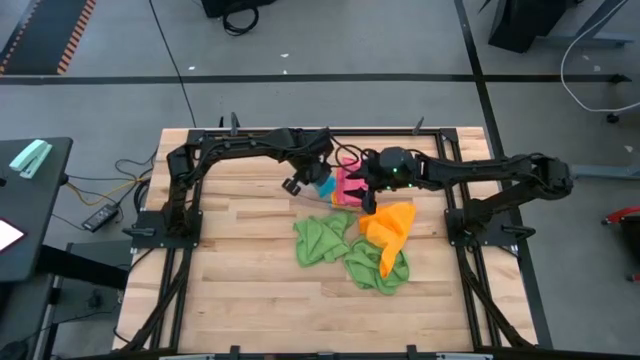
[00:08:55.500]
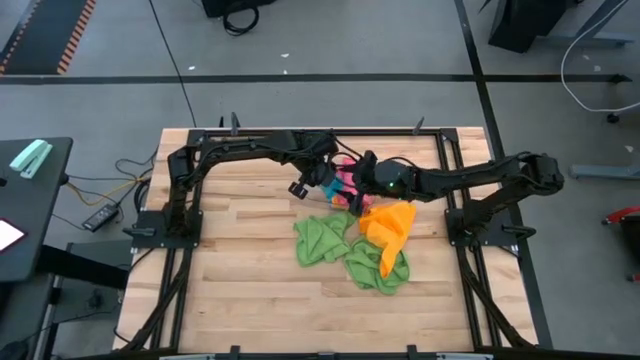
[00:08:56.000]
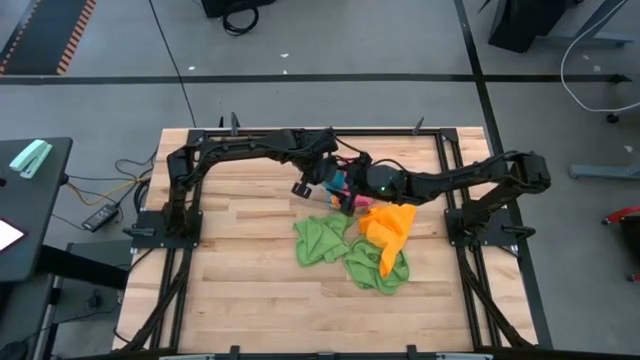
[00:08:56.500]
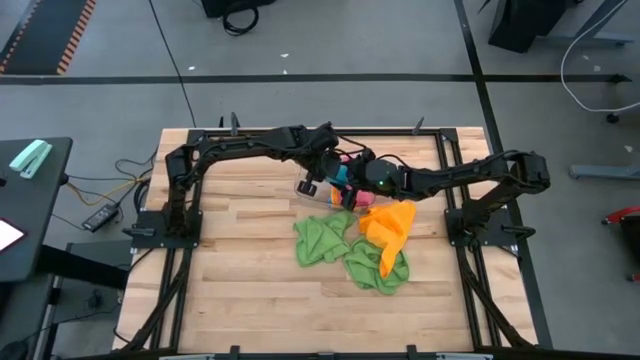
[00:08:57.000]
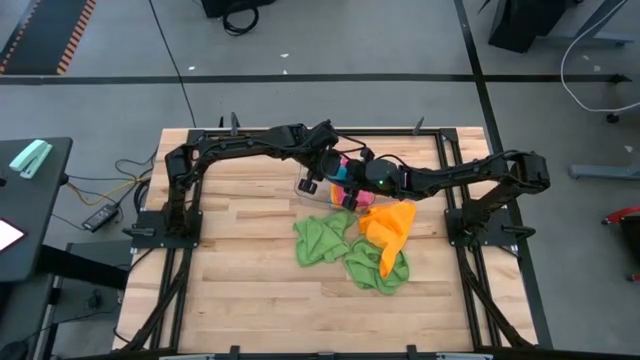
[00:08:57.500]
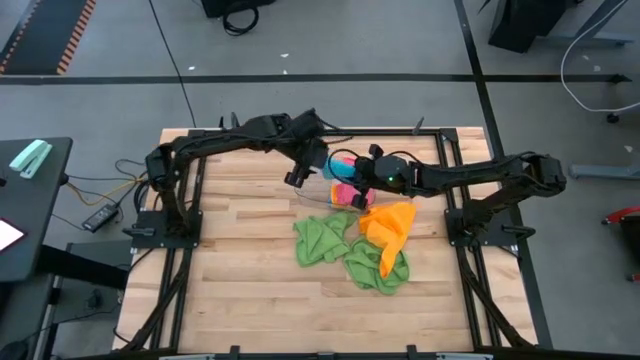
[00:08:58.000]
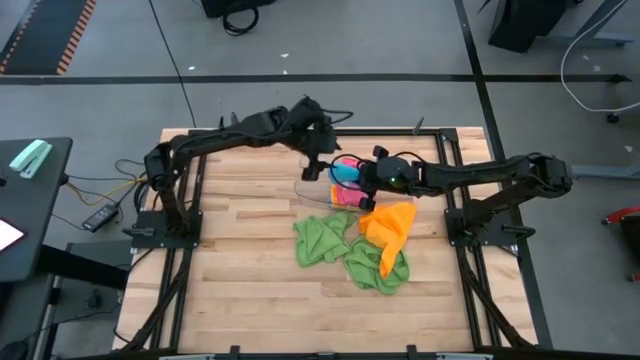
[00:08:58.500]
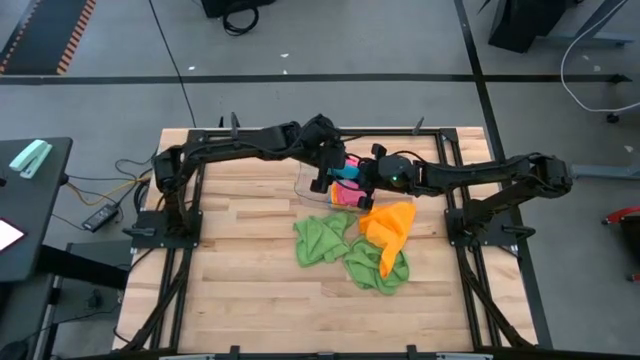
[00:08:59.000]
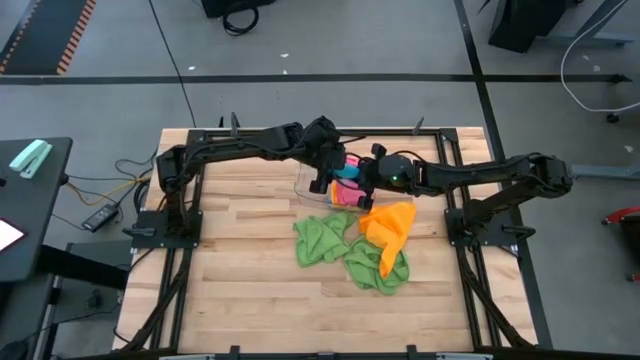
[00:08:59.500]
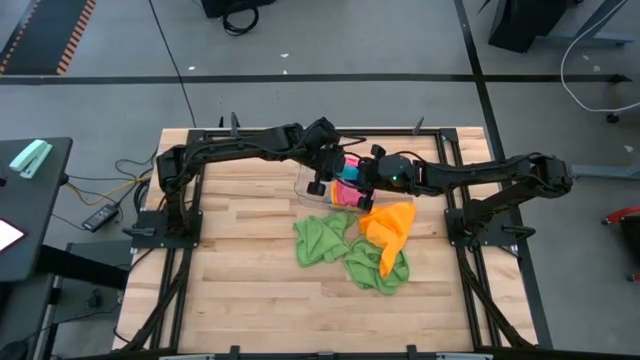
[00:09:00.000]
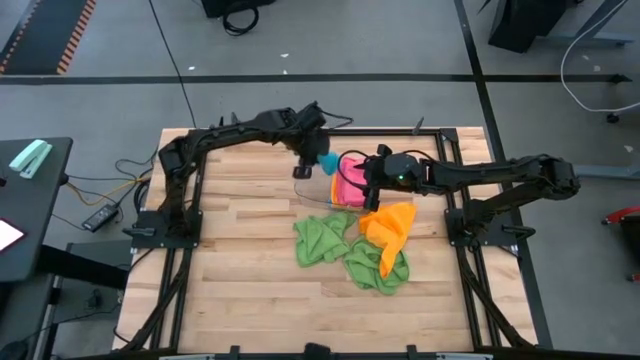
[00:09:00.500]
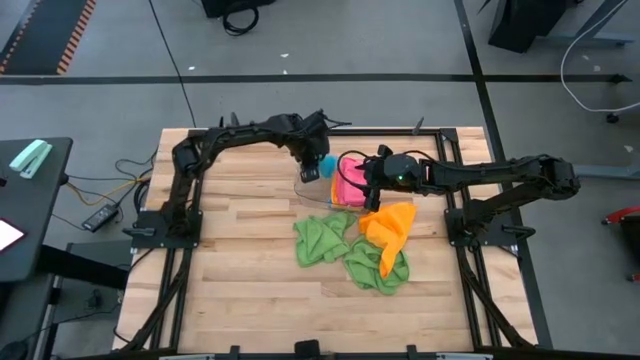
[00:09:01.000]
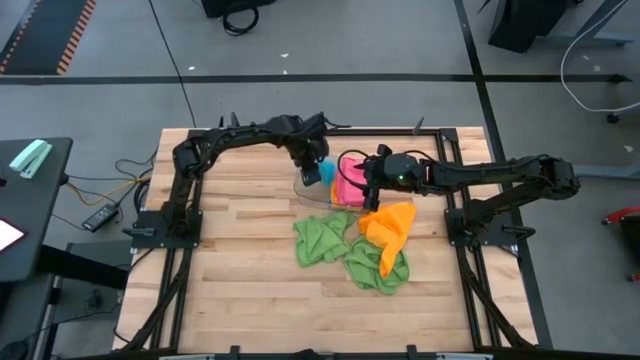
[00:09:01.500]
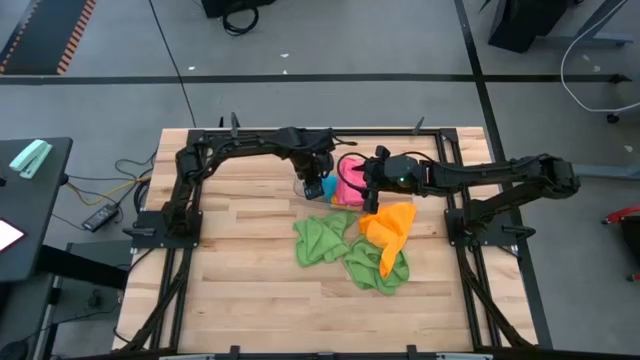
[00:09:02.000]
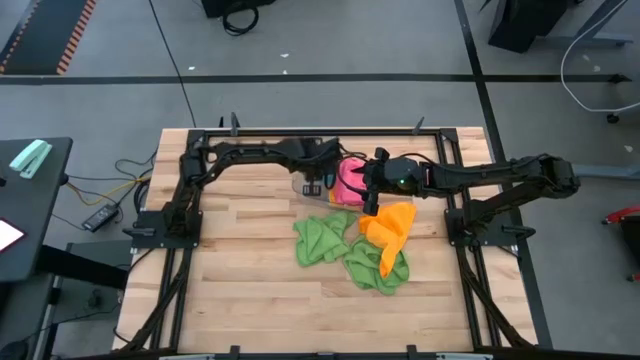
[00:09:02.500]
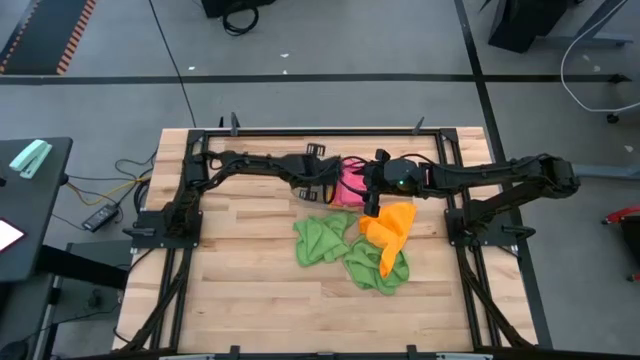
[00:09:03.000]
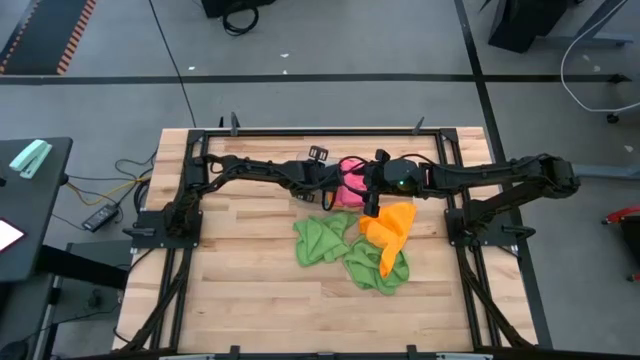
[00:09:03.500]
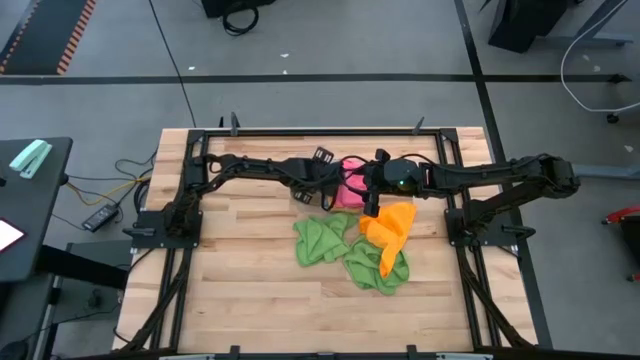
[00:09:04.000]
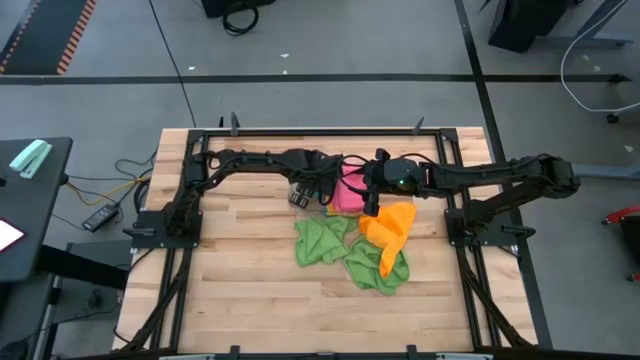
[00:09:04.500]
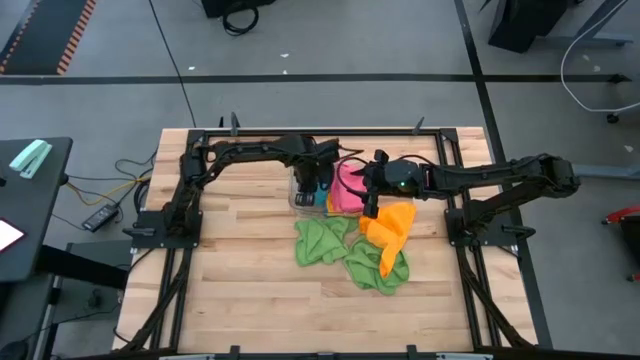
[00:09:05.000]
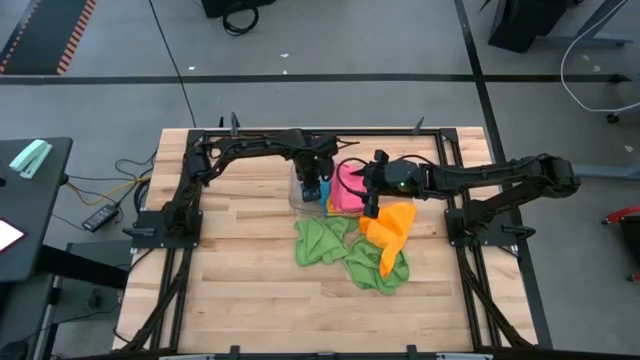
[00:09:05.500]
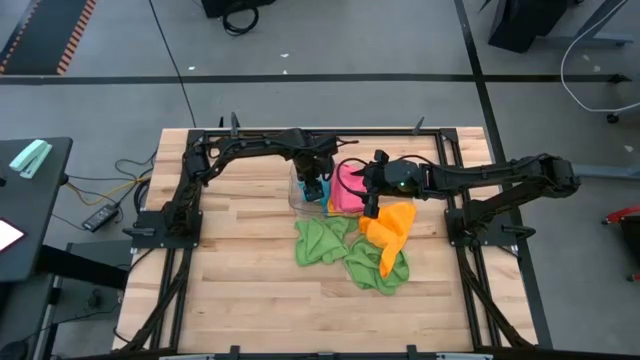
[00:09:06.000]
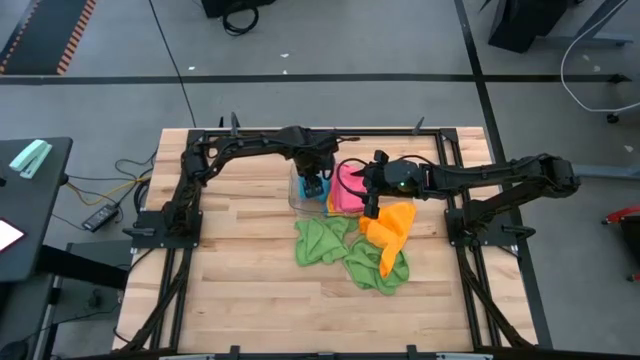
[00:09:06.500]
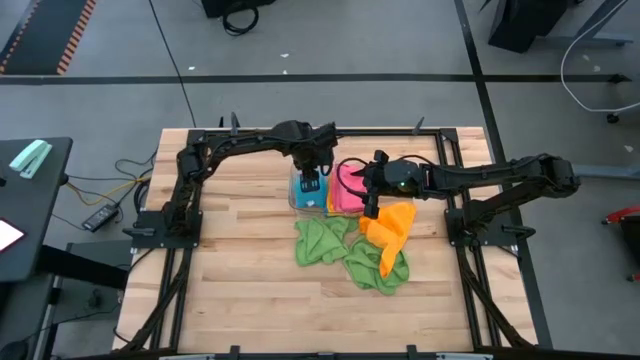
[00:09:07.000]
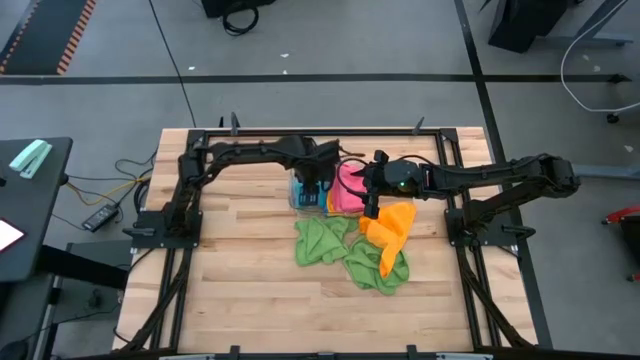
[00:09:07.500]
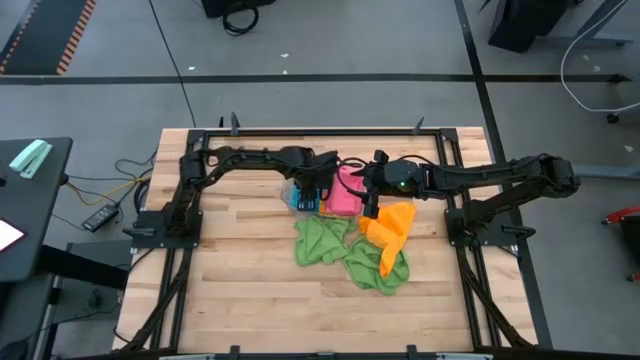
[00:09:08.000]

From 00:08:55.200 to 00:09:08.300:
Task: Fold microfiber towels
Put the folded blue microfiber cloth into the transparent bin

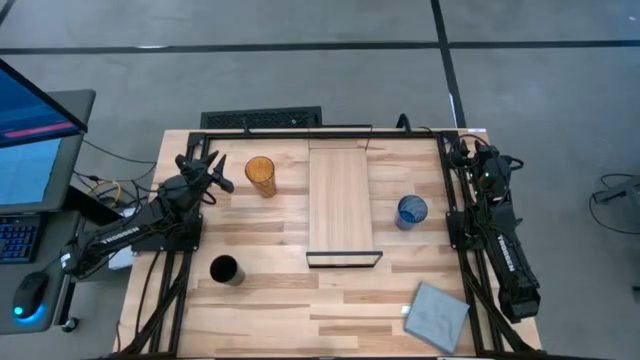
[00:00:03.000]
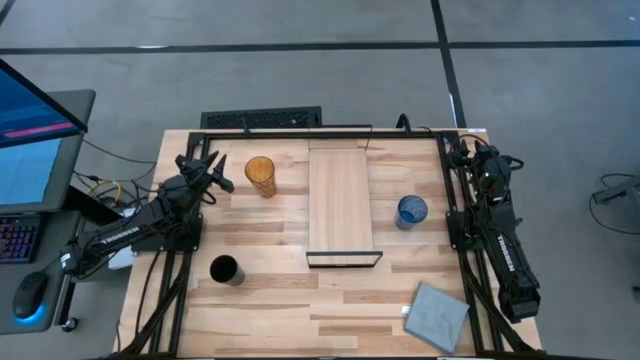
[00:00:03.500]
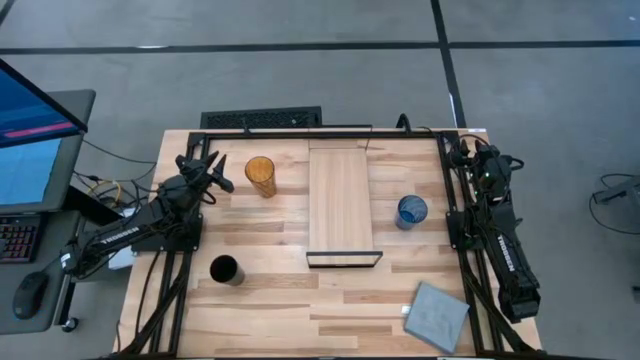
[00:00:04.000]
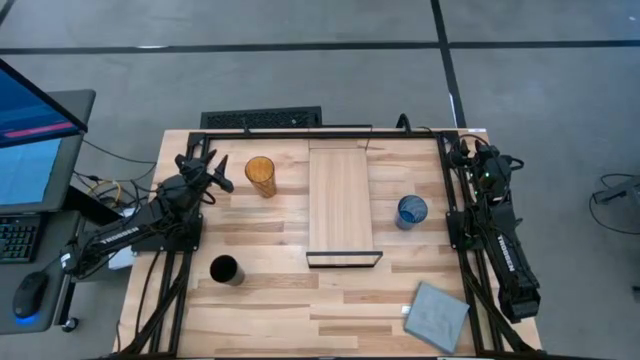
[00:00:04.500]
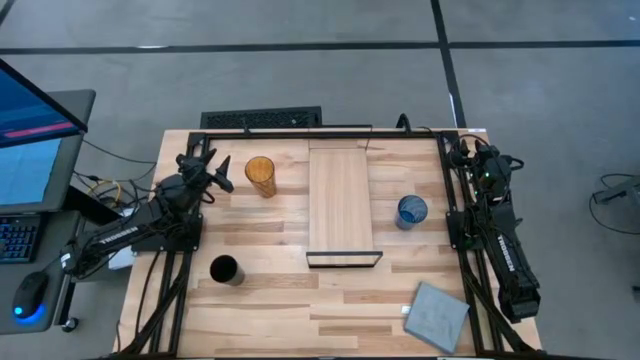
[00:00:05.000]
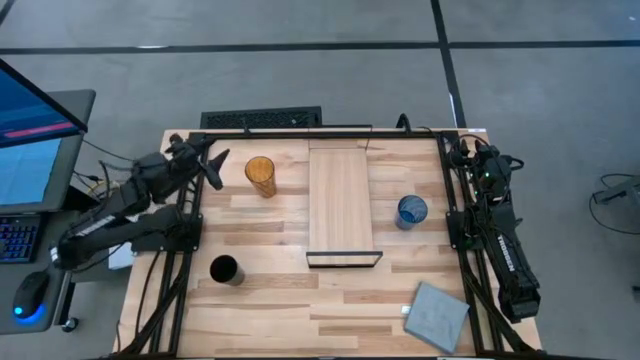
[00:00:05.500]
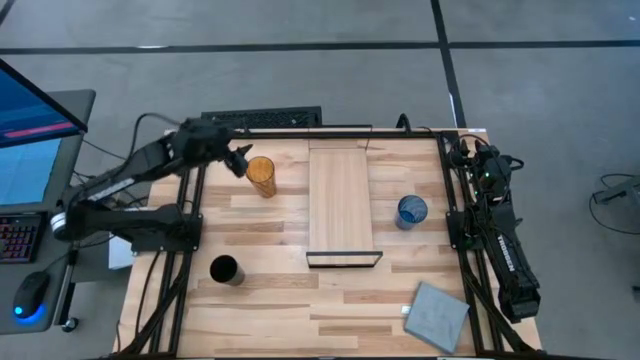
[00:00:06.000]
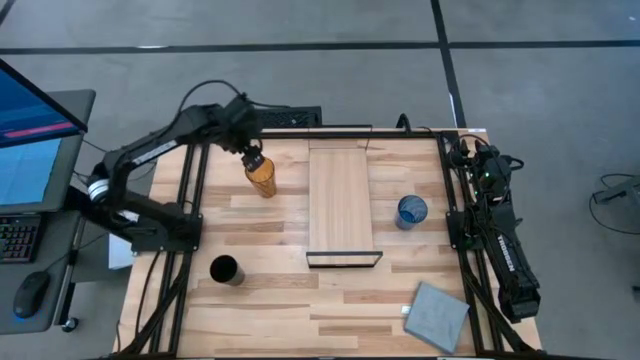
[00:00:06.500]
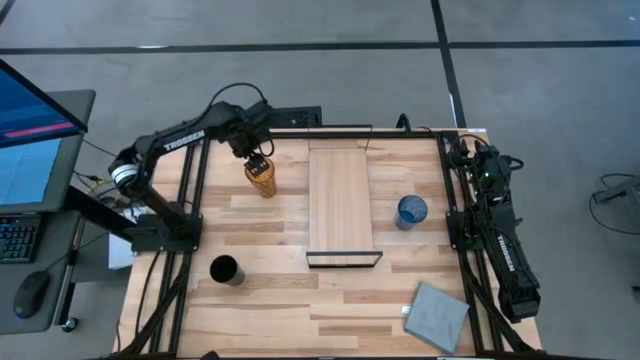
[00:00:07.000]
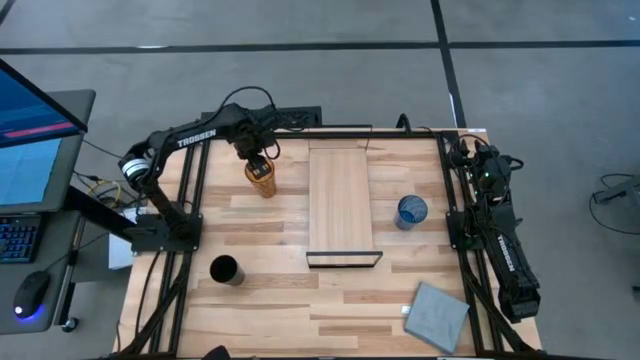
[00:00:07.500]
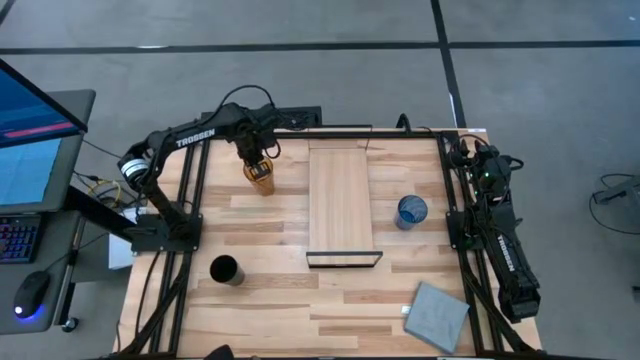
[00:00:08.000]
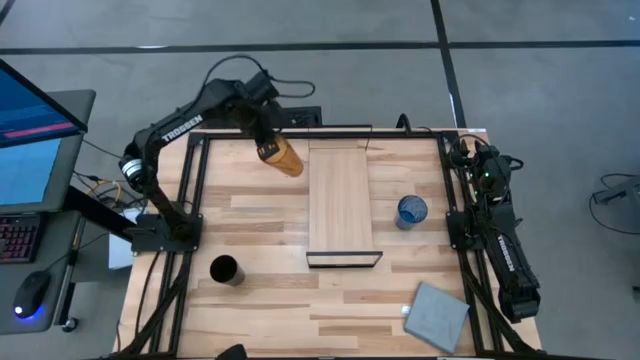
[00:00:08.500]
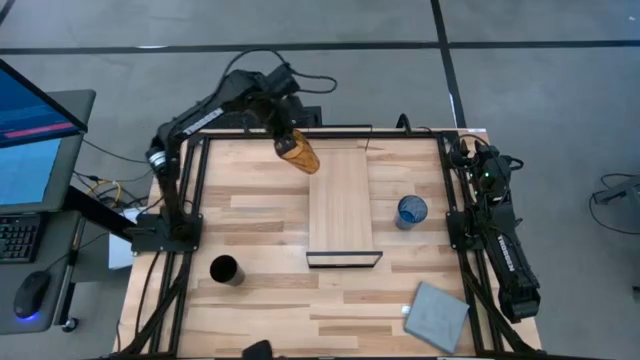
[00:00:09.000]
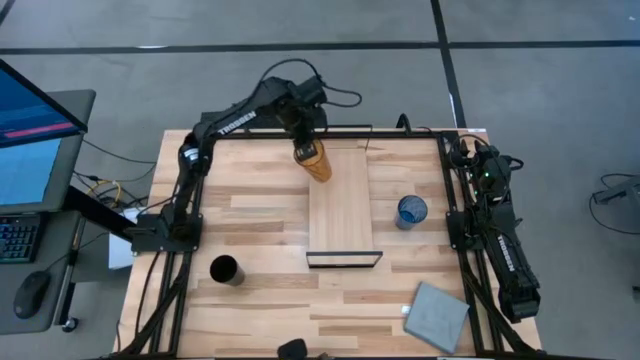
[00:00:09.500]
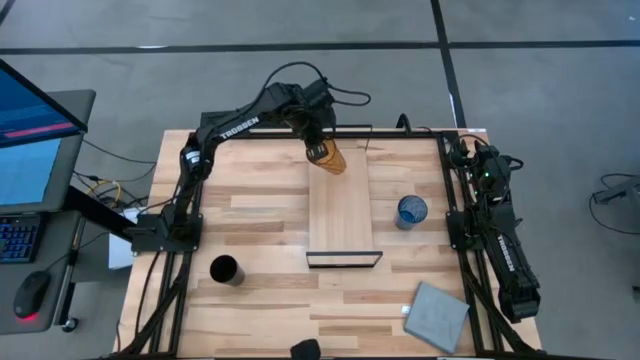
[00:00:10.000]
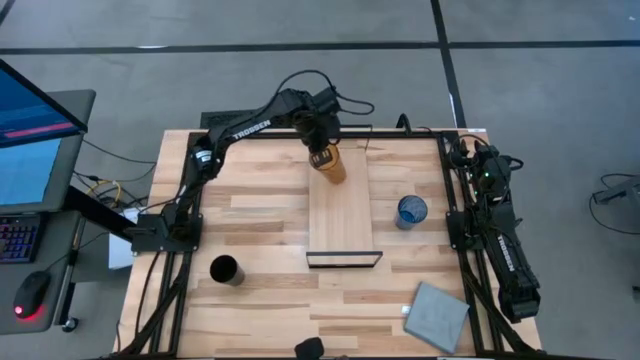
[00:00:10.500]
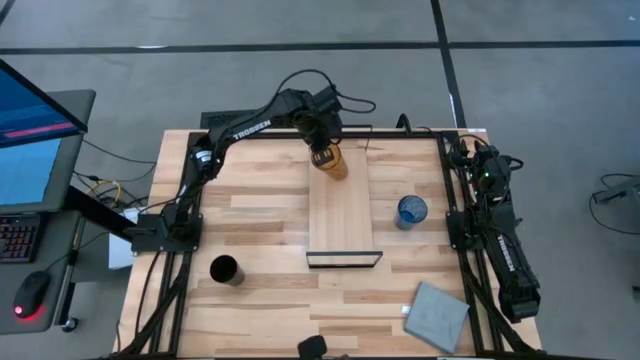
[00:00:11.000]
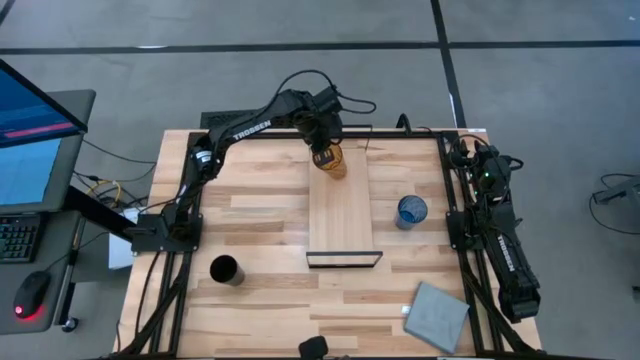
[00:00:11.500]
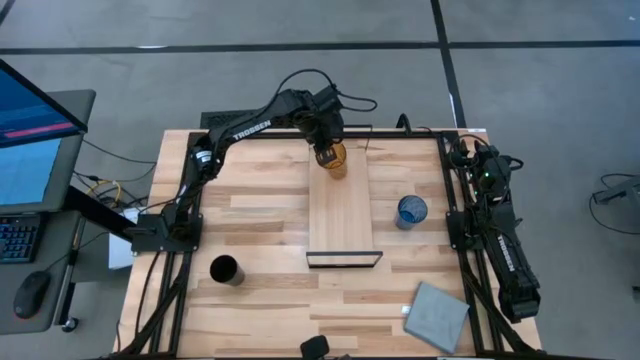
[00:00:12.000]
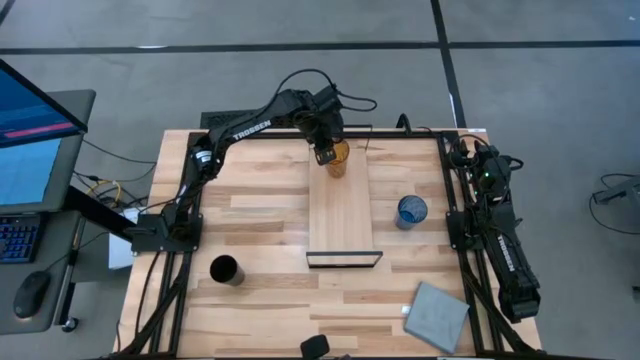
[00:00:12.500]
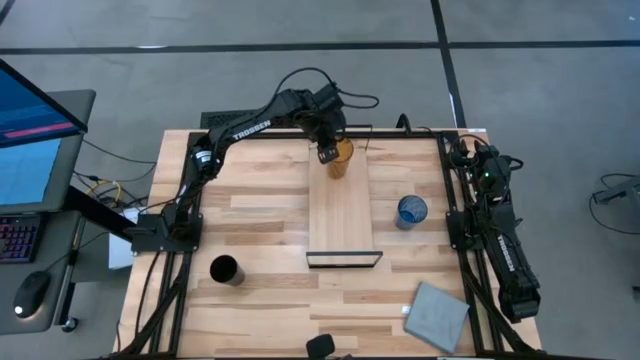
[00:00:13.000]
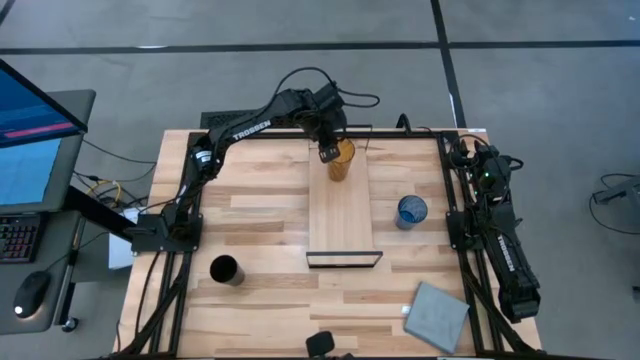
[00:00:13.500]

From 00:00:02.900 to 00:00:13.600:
Task: Stack small to large cups/mugs on shelf
Put the brown cup on the shelf
